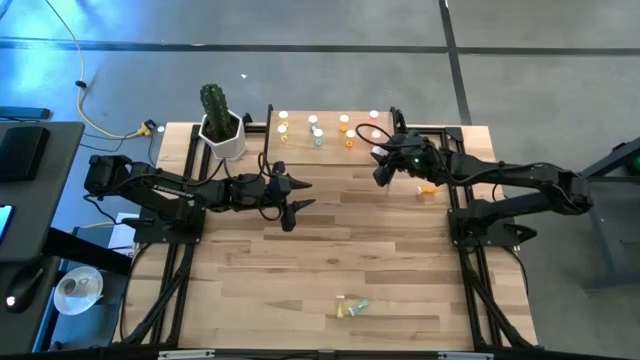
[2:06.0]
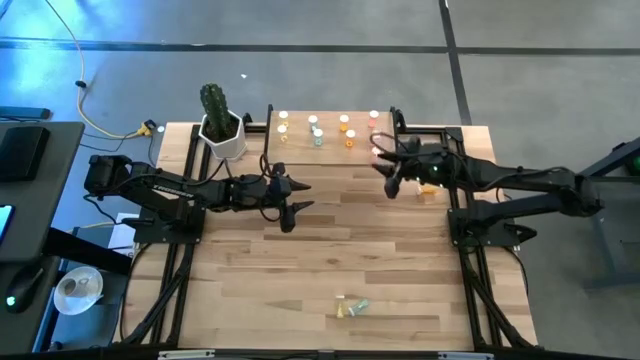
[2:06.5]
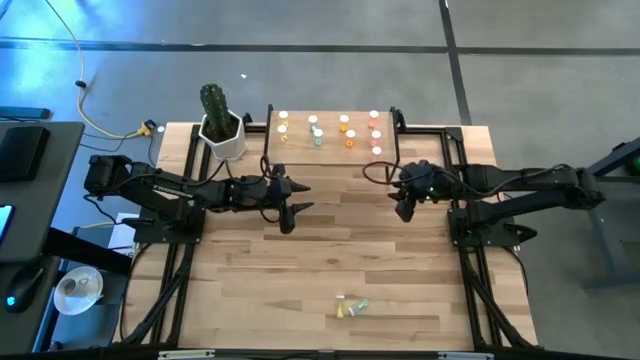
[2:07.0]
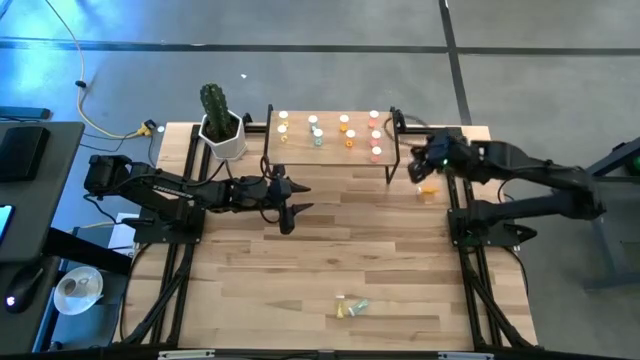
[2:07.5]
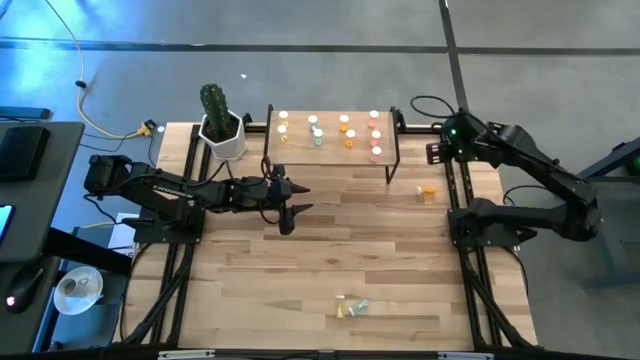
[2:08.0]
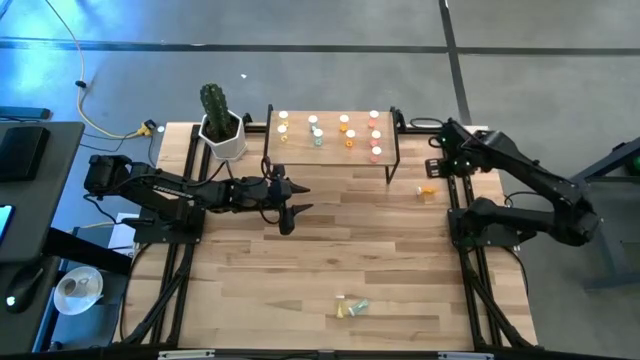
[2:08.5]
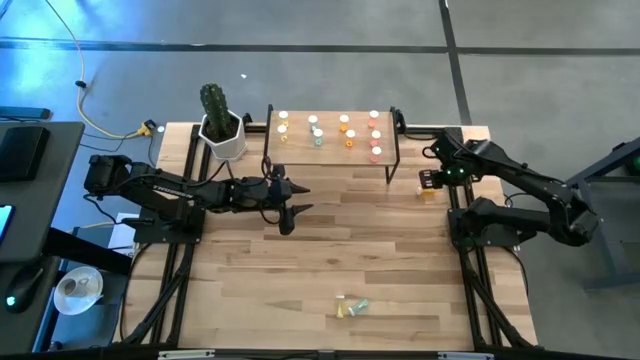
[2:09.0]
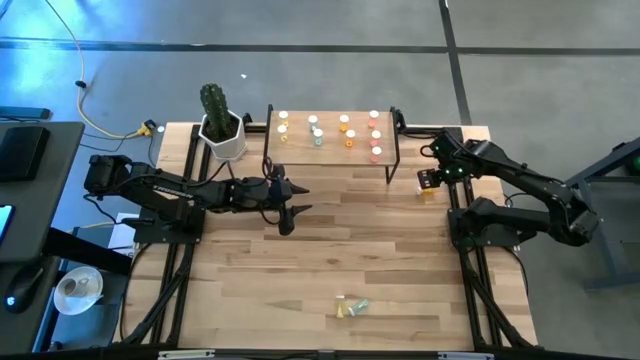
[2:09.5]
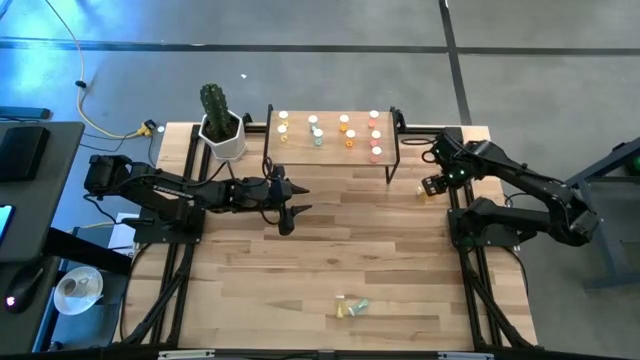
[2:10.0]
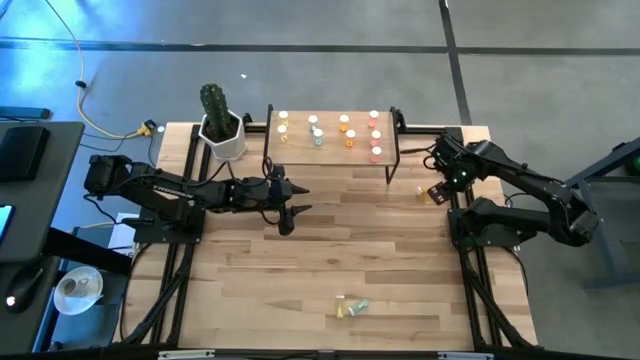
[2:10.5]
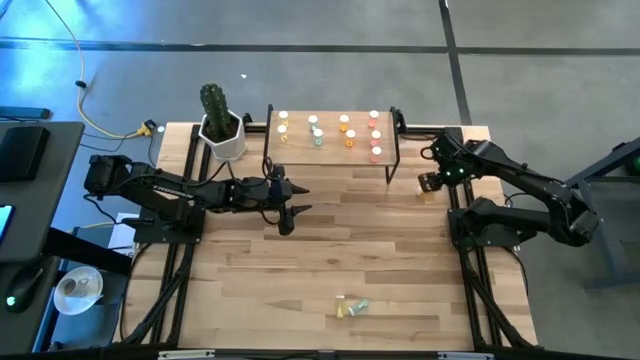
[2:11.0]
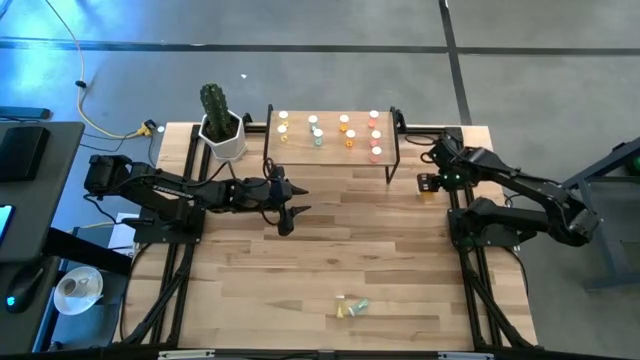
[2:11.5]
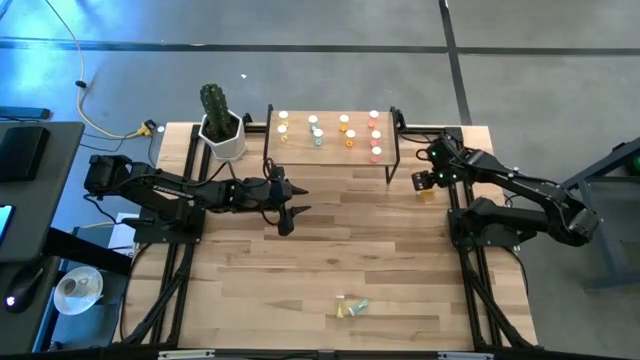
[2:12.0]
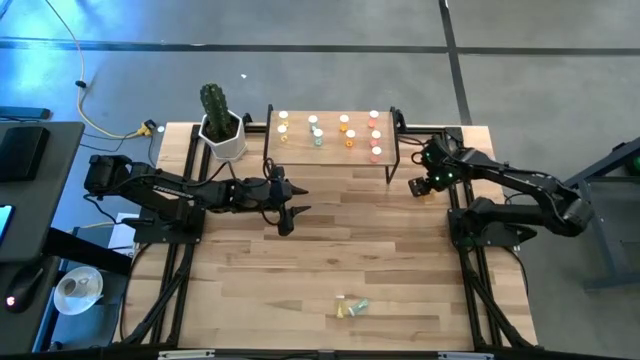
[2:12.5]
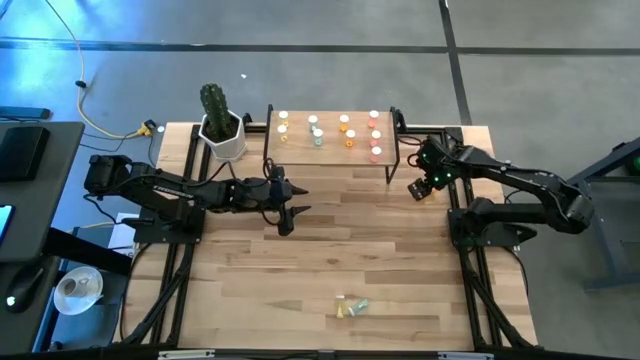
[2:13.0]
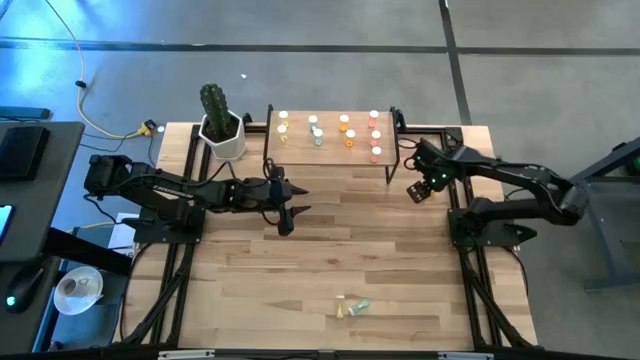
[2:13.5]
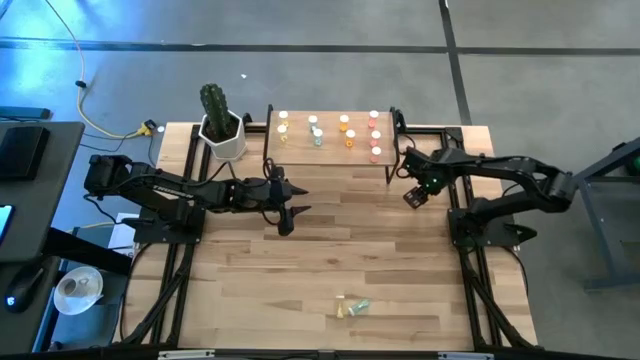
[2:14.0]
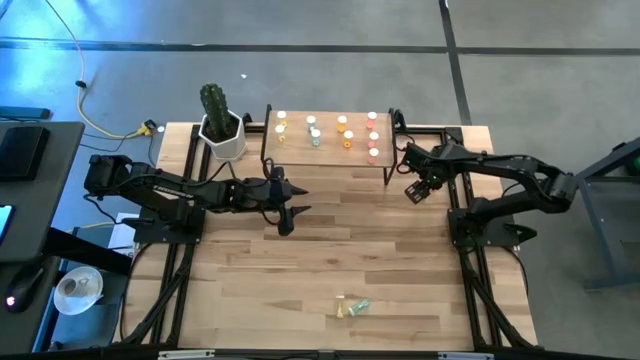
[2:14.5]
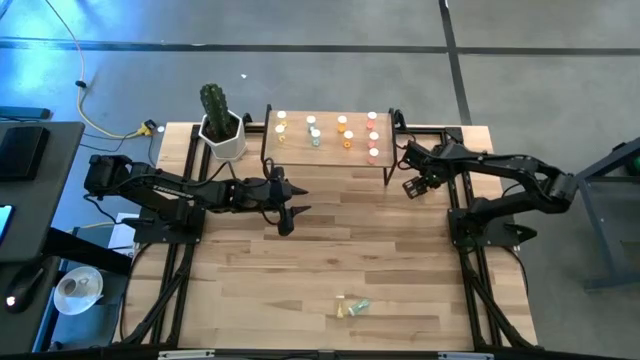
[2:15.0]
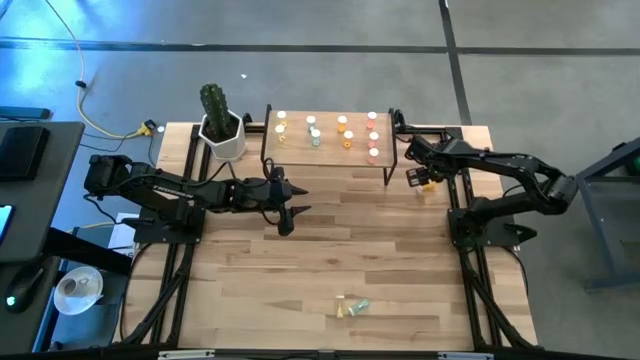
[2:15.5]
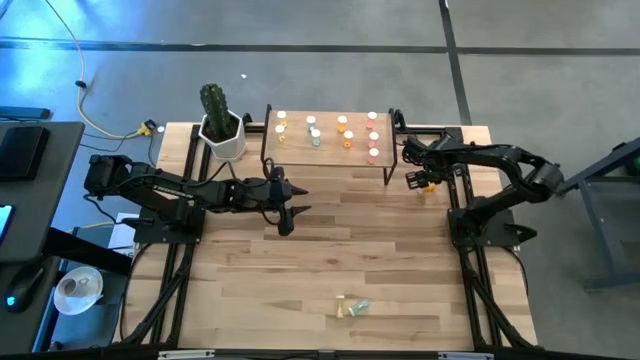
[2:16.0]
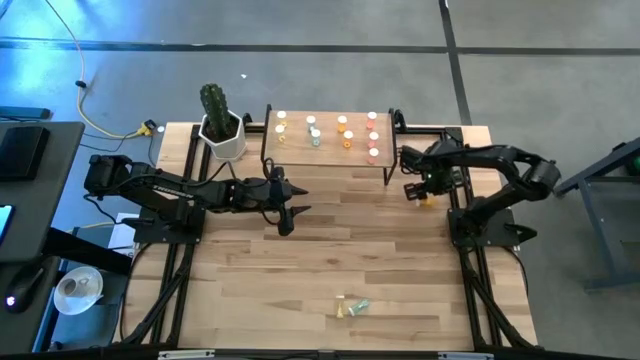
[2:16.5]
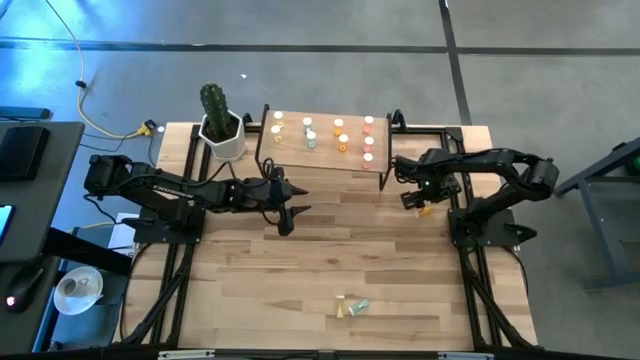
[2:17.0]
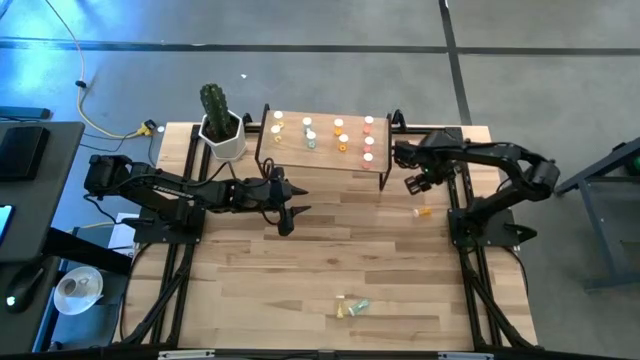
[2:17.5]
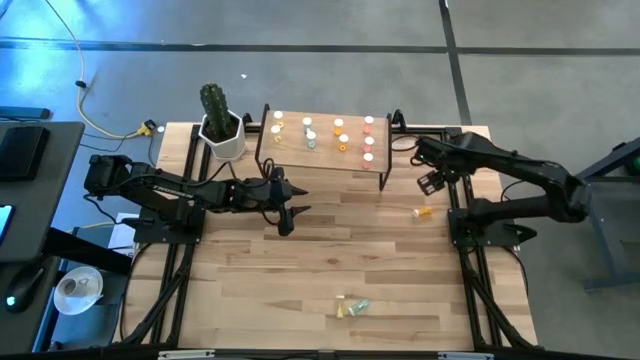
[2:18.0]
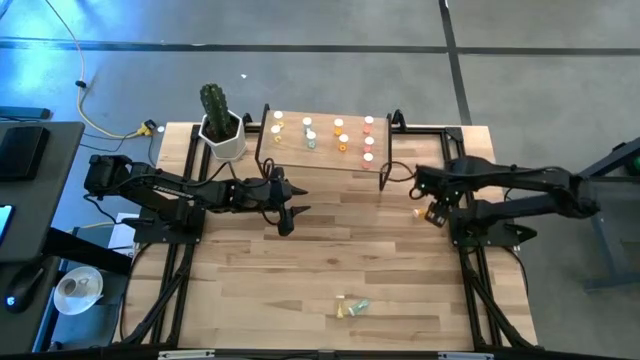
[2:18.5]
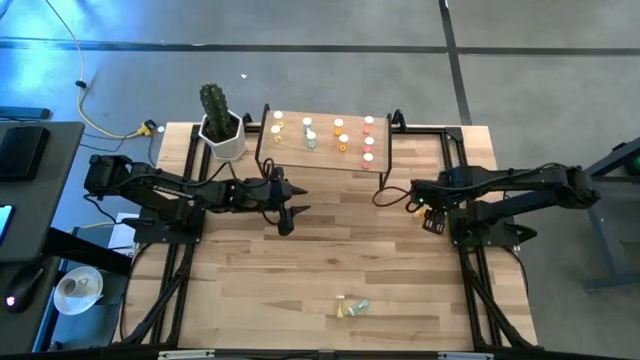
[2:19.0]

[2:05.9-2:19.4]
Task: Pick and place medicine bottles onto shelf by color
Put the orange pill bottle on the shelf aligned with the other orange pill bottles

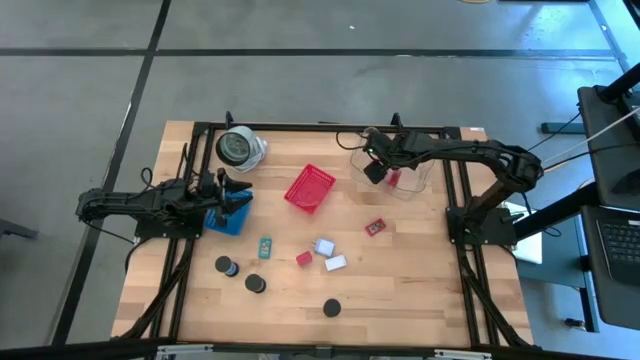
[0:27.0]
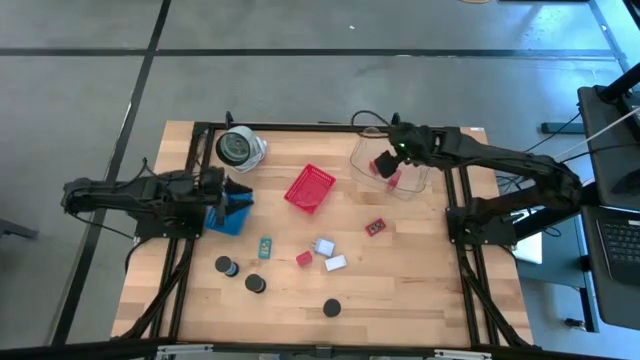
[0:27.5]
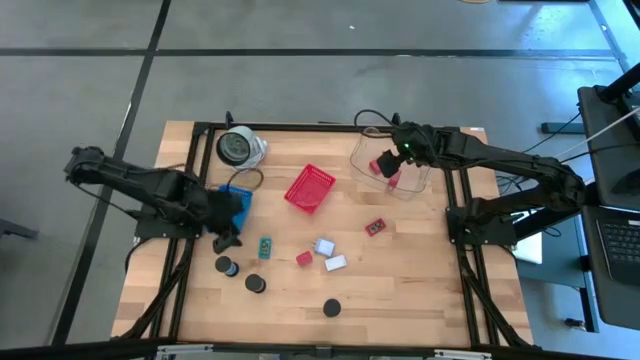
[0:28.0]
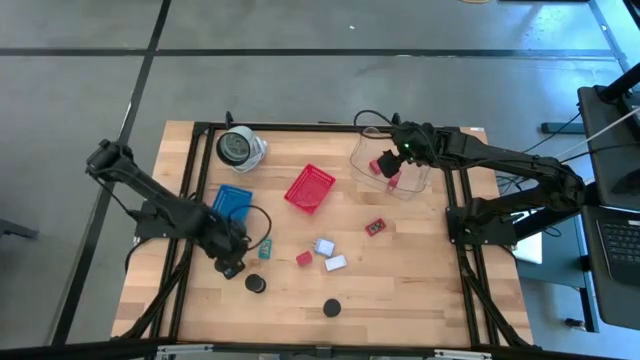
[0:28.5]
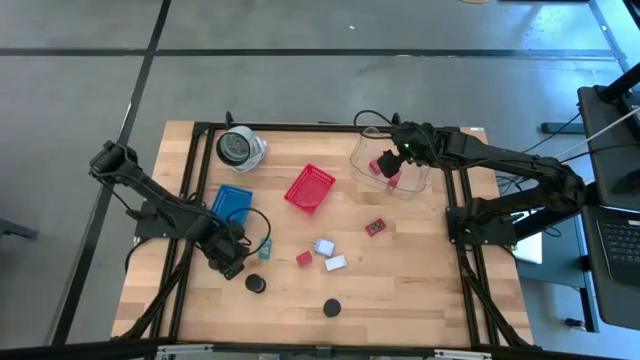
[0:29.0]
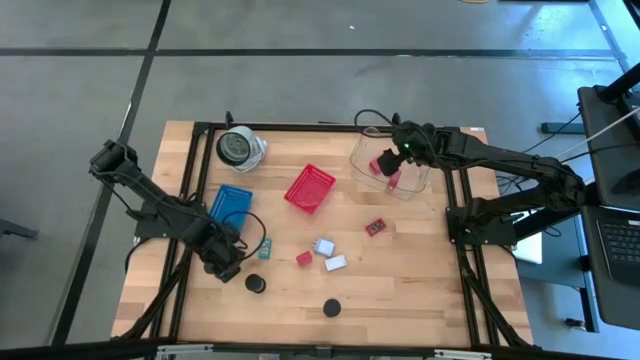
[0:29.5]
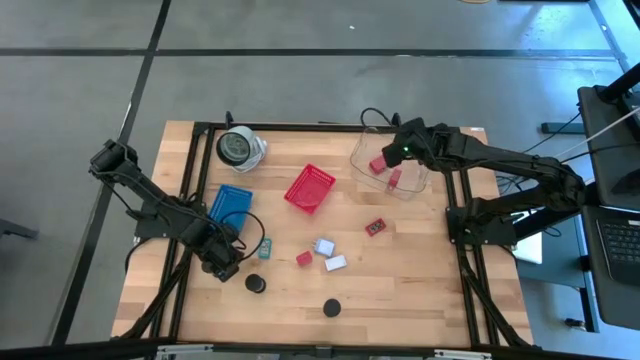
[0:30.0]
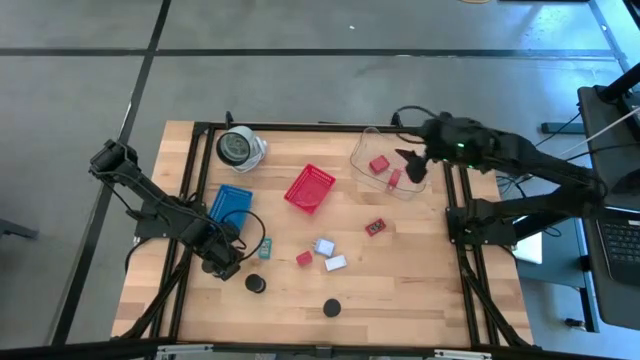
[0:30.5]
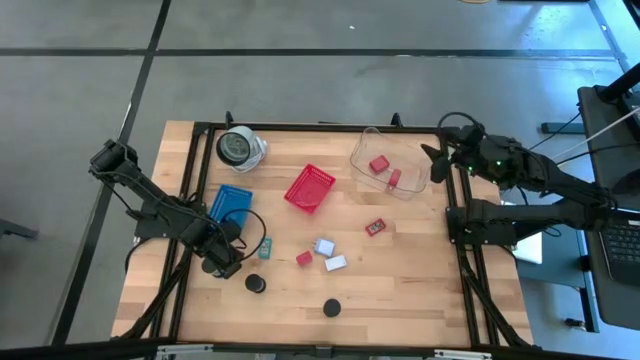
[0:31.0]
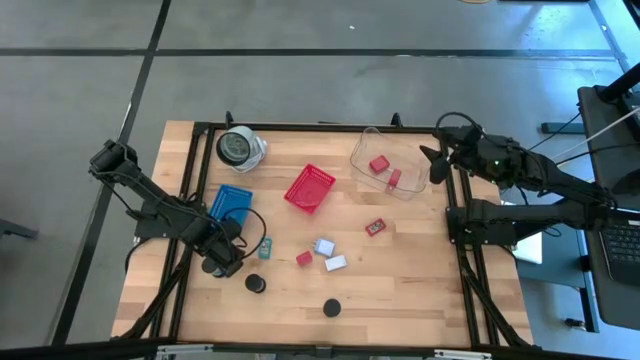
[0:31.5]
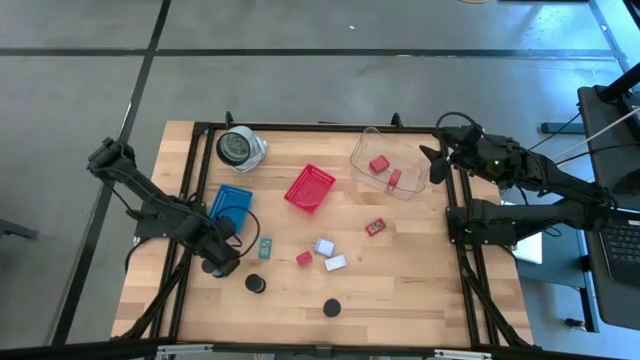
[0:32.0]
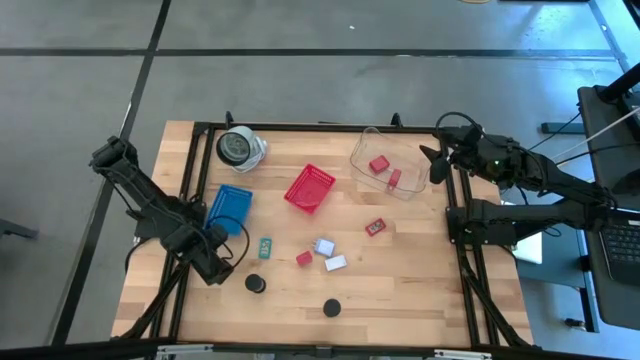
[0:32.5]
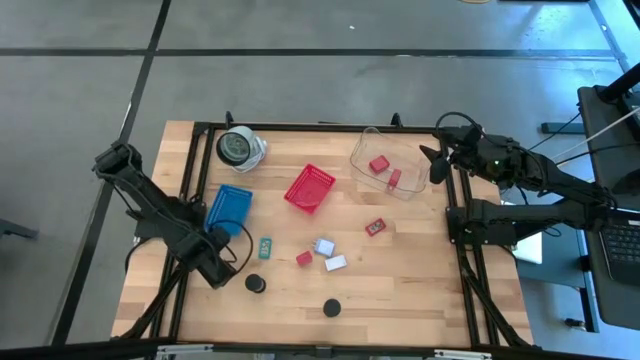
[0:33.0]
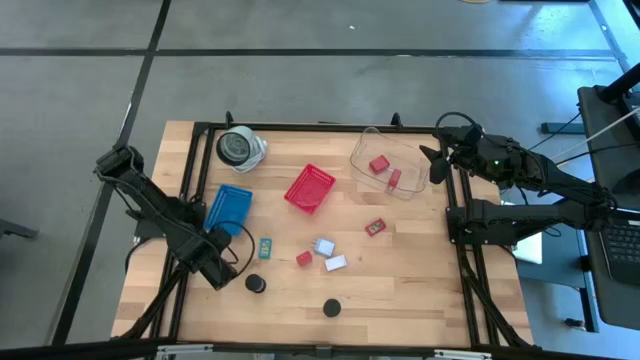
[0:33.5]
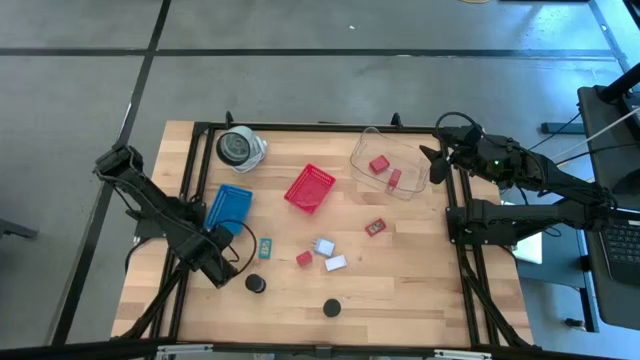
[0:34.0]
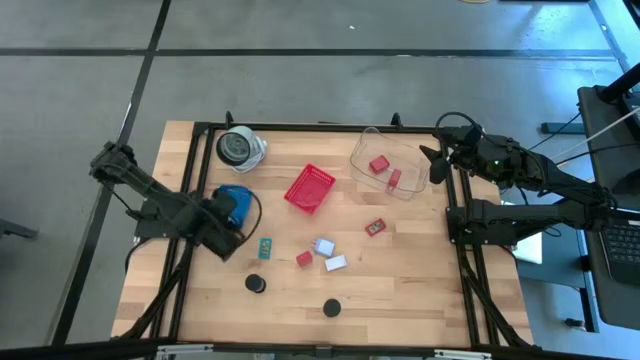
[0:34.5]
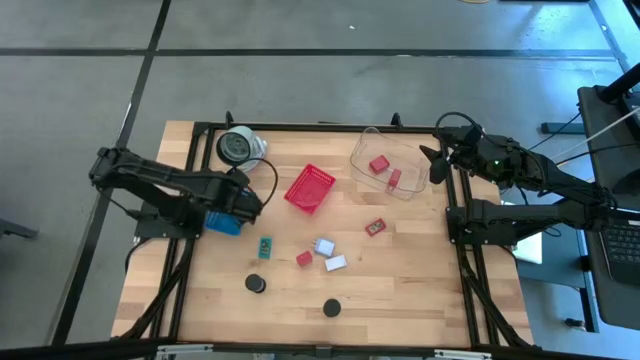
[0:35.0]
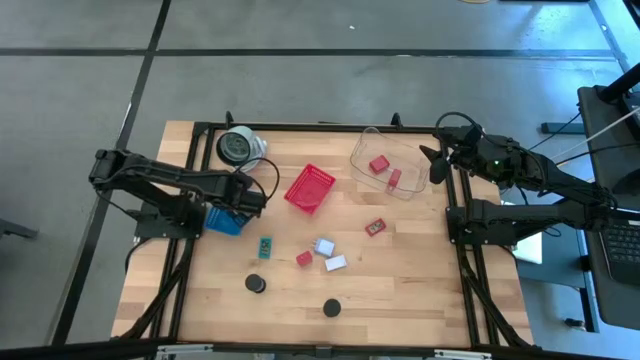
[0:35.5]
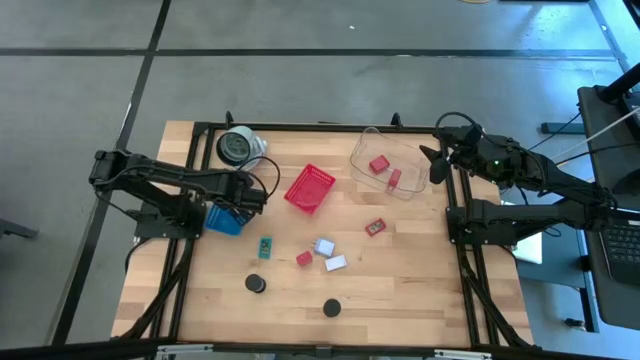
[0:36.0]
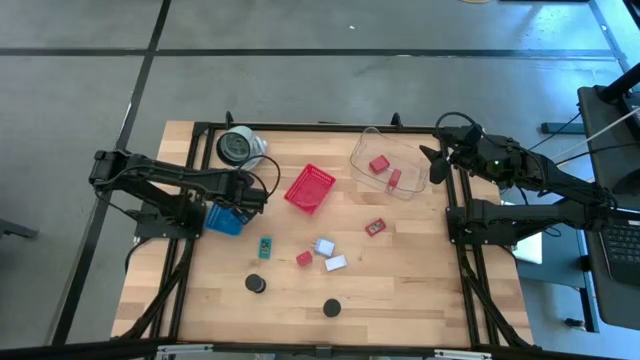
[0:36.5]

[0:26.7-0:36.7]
Task: Pick & Place Office items
Put the blue hourglass into the blue bin
